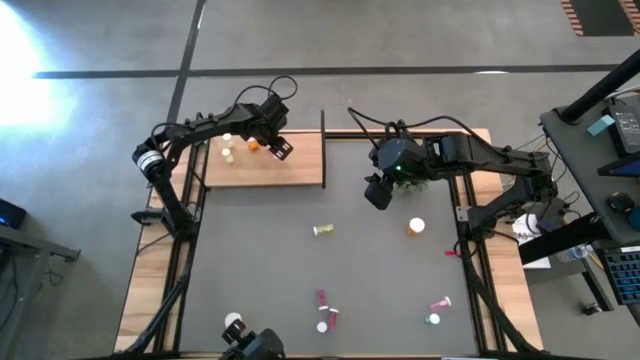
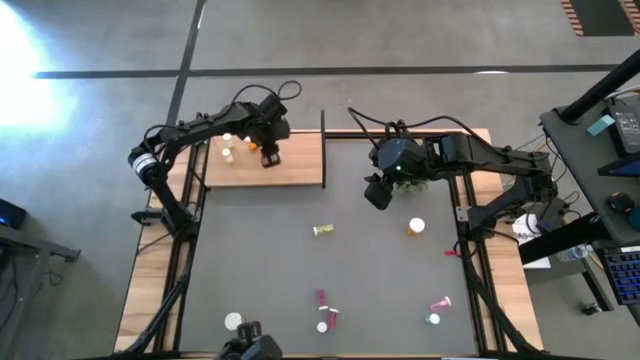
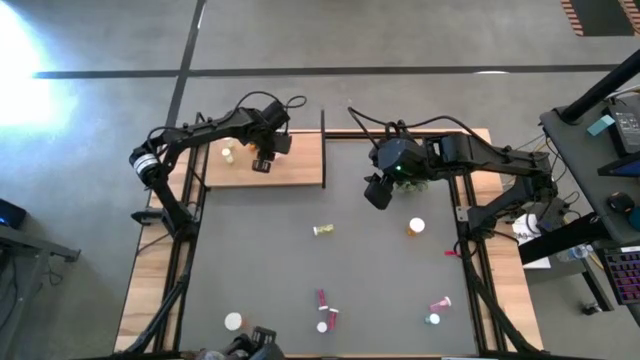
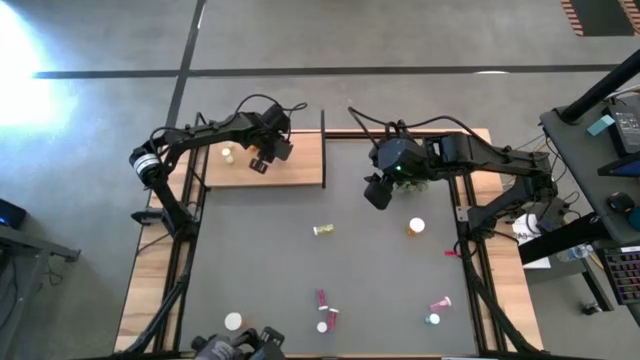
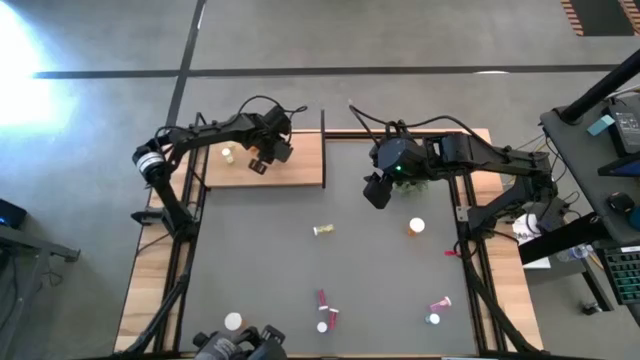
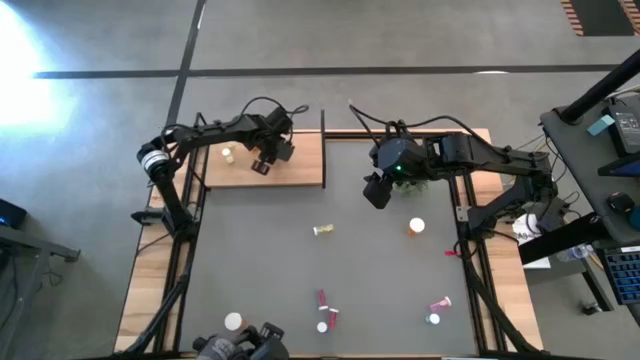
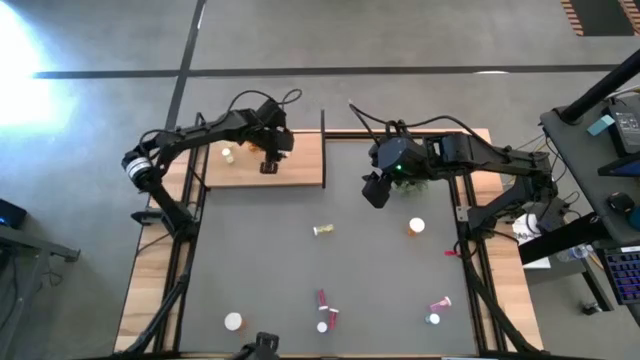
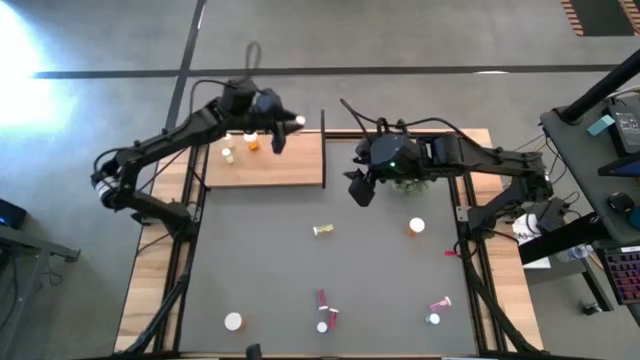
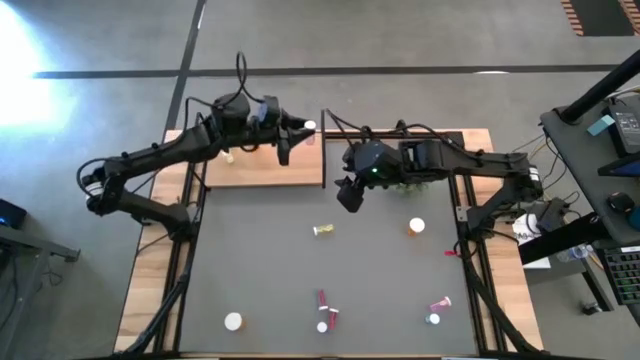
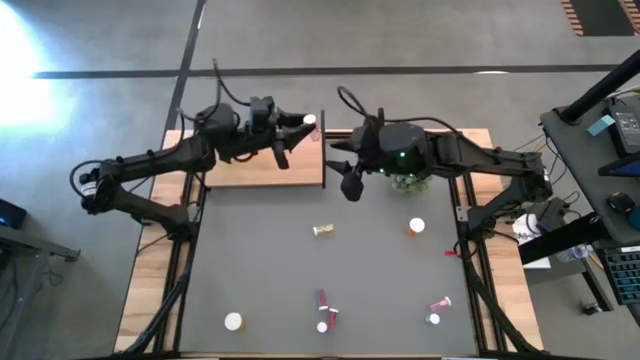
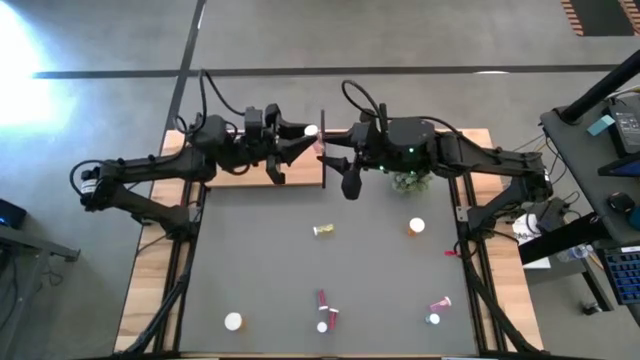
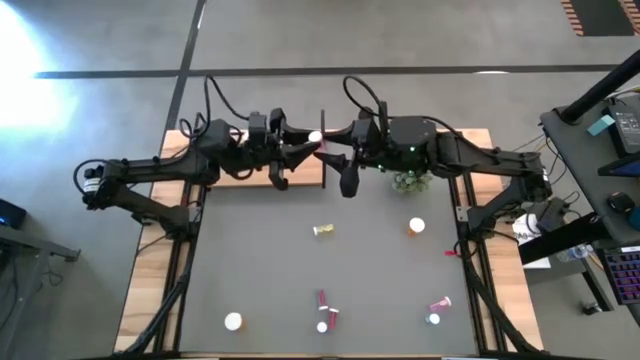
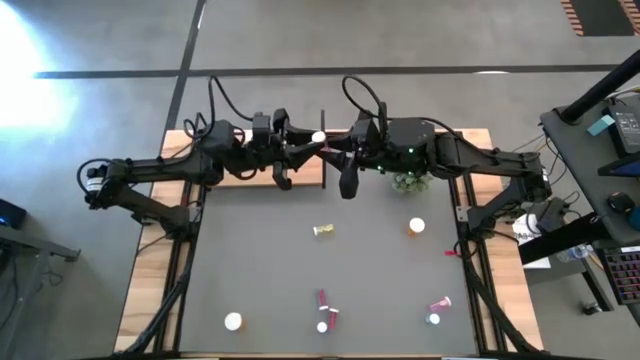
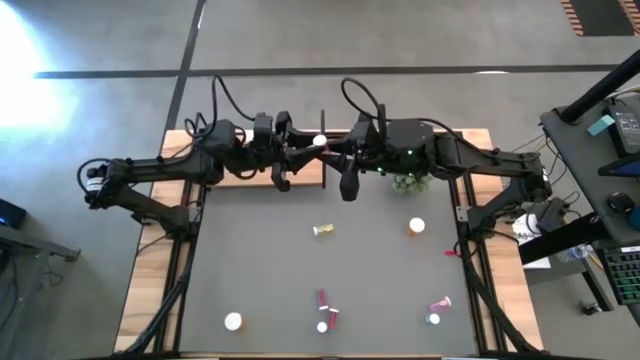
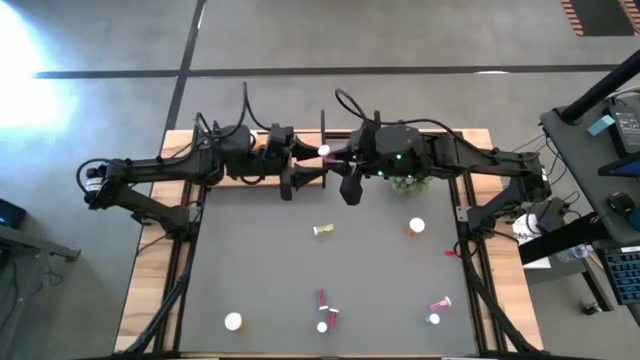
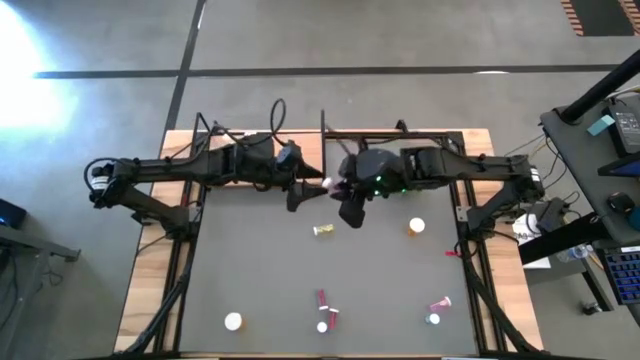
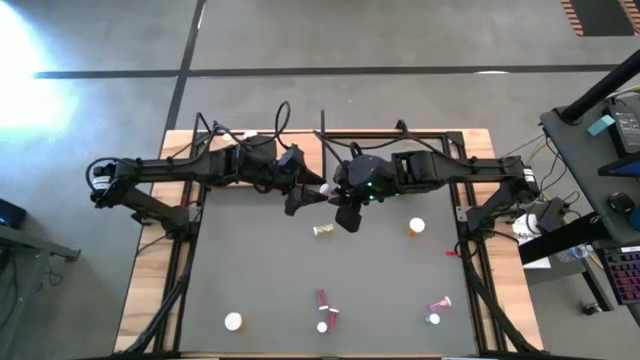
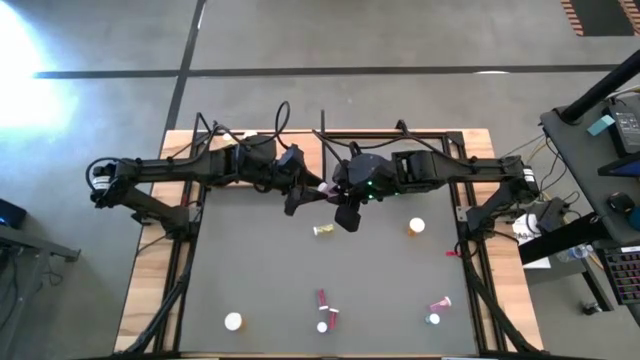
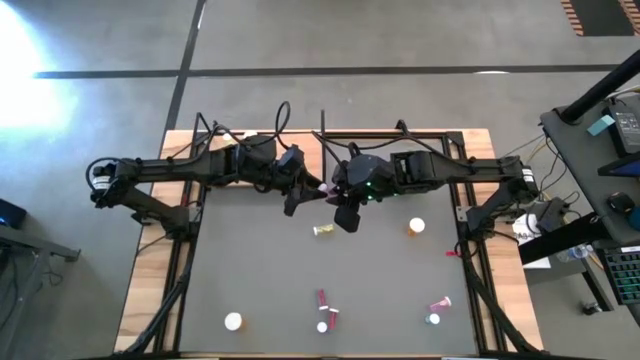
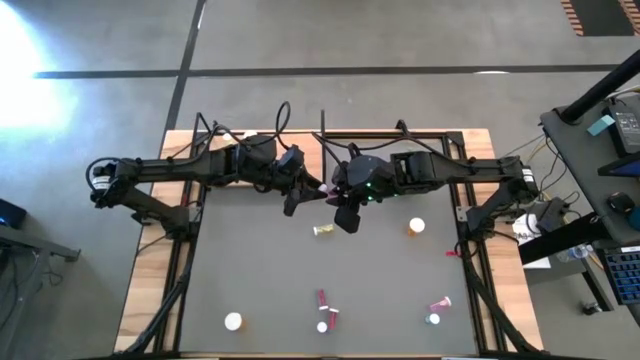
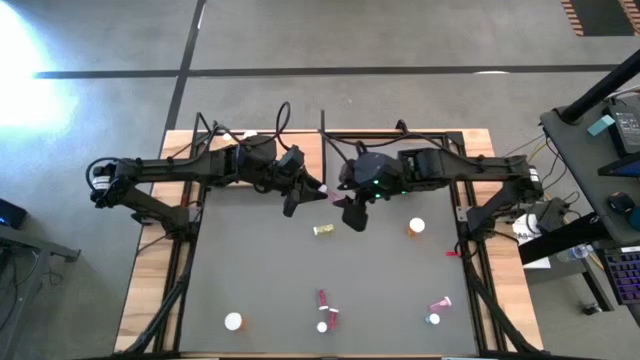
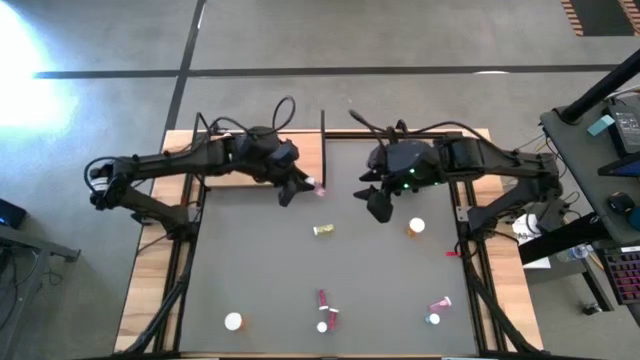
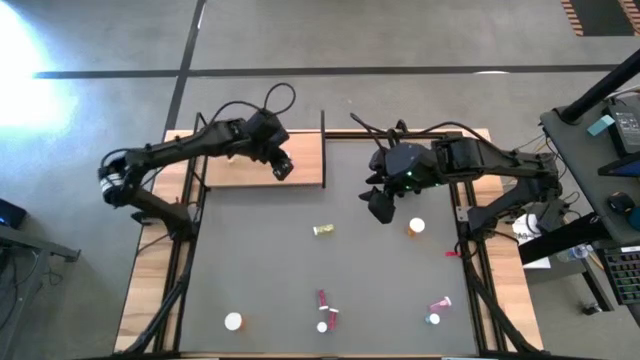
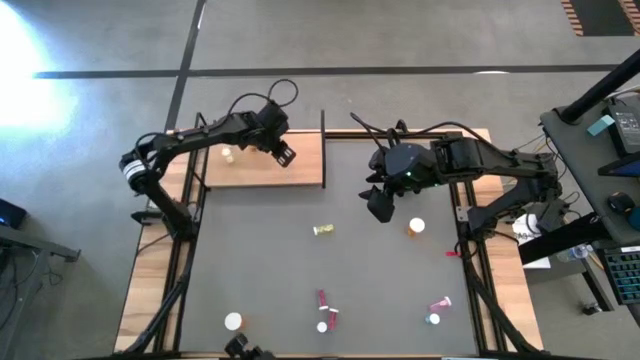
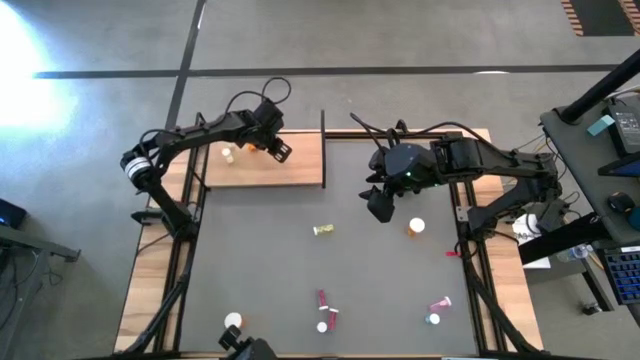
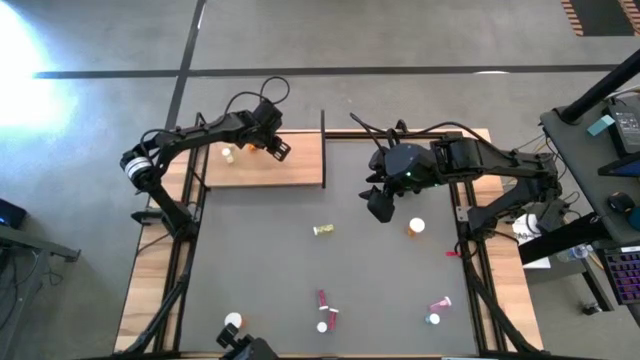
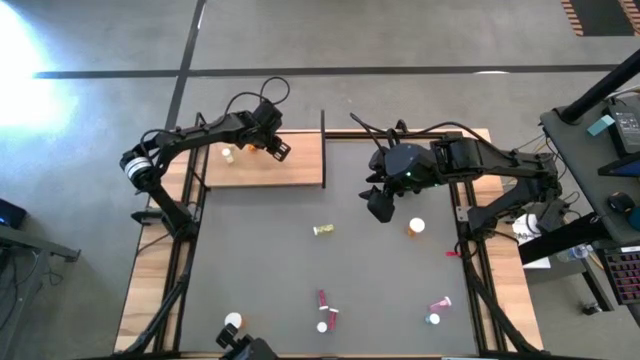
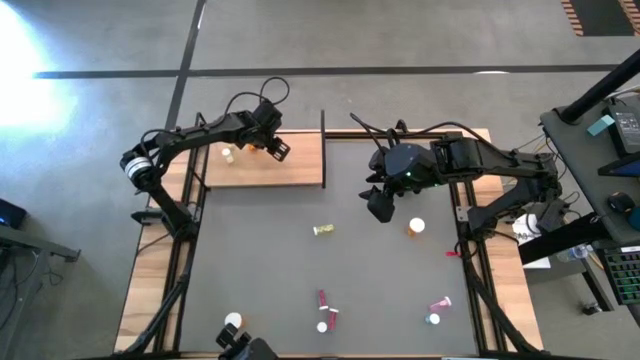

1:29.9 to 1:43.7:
Task: Pick and place medicine bottles onto shelf by color
Put the top left pink pill bottle on the shelf

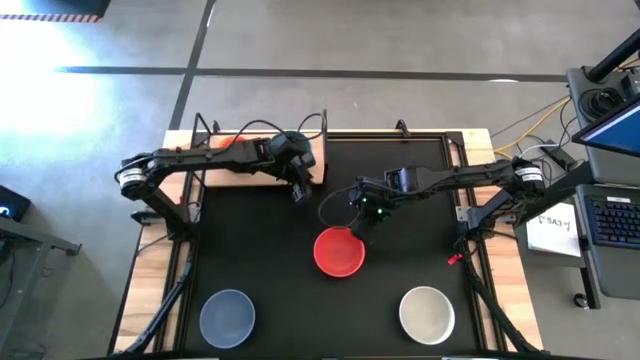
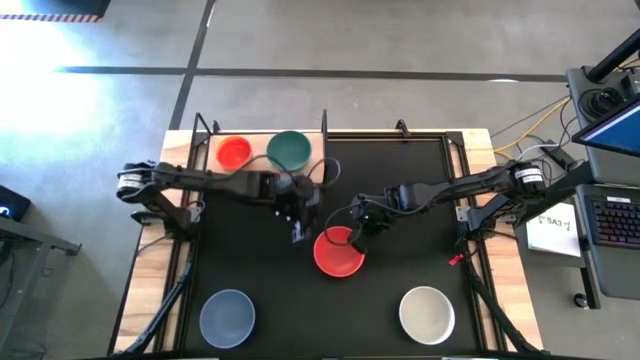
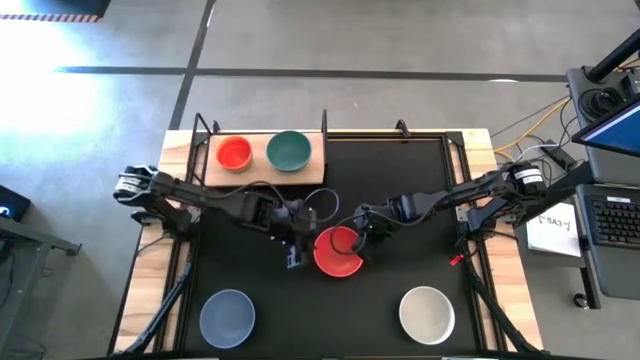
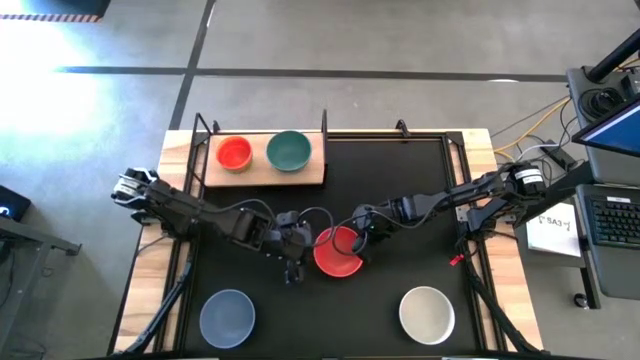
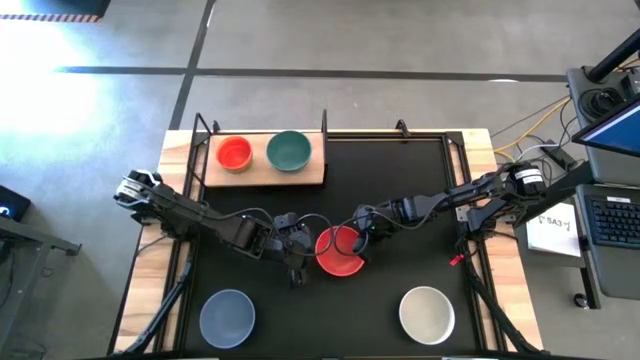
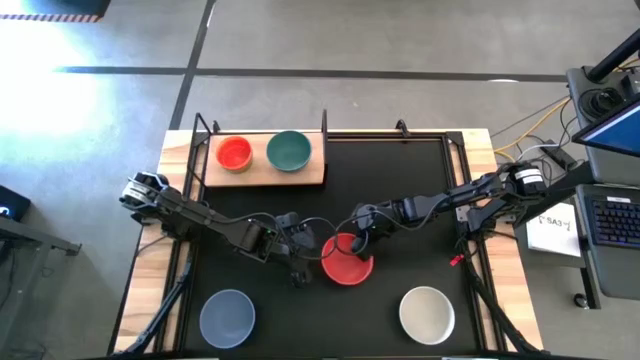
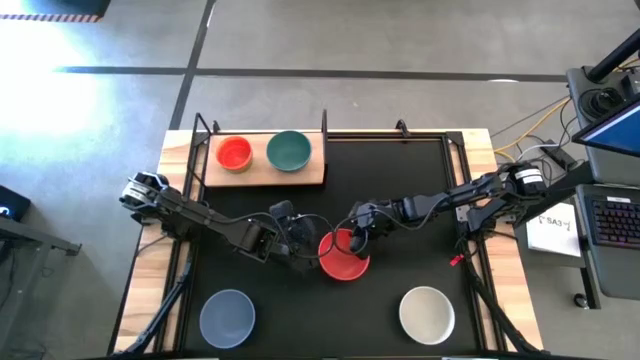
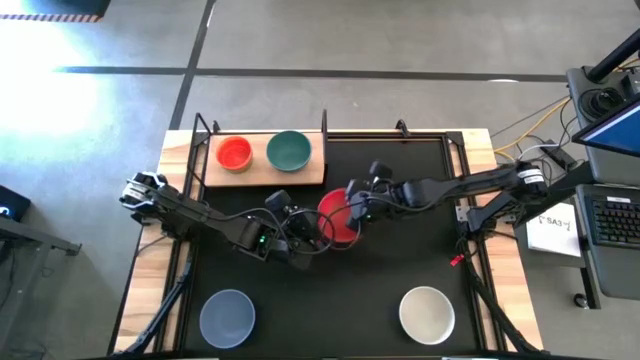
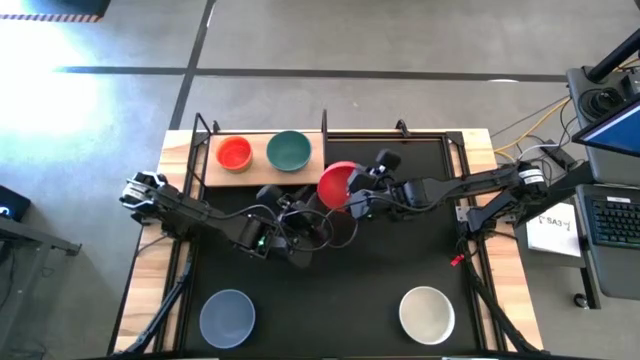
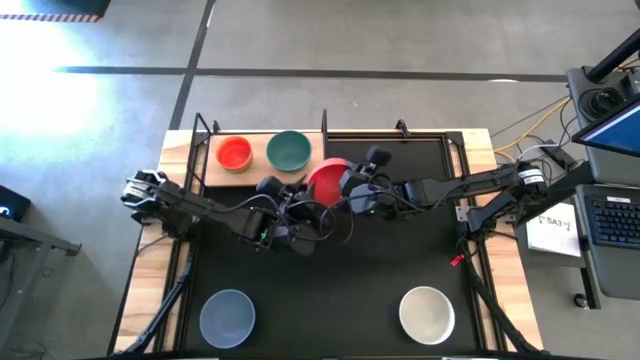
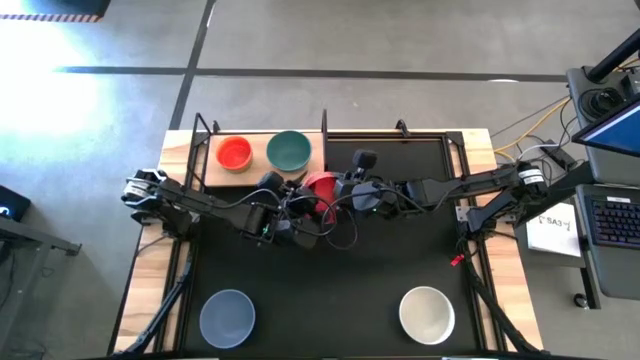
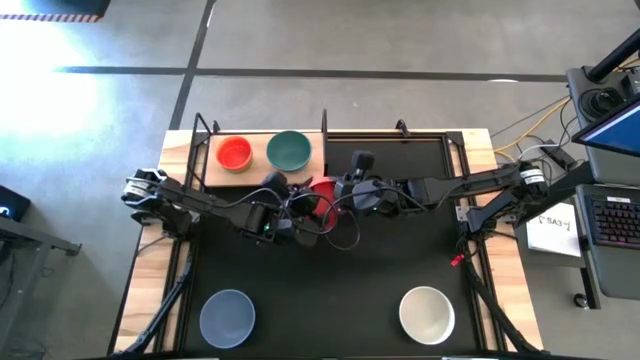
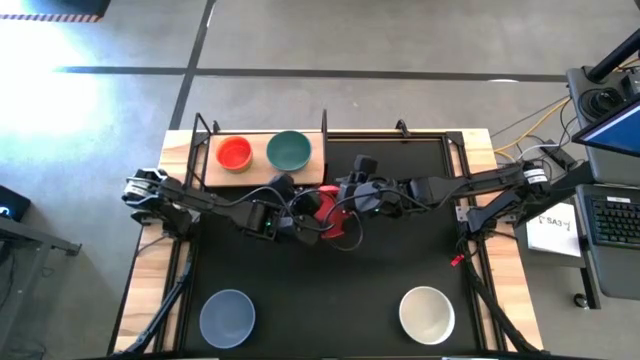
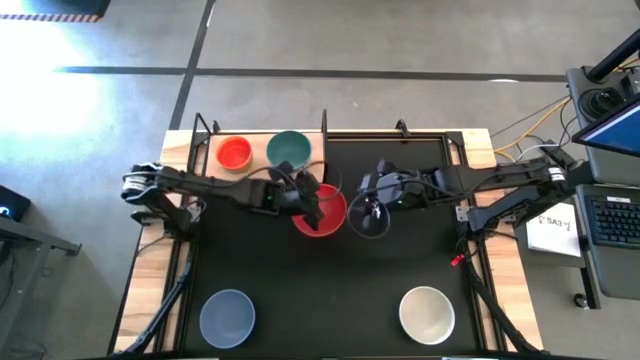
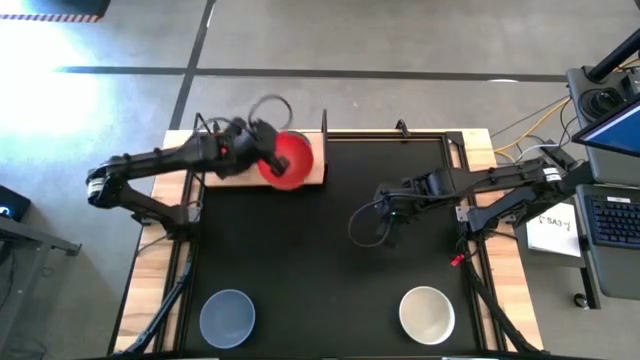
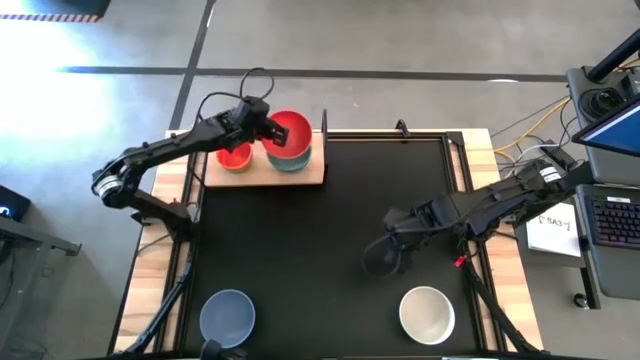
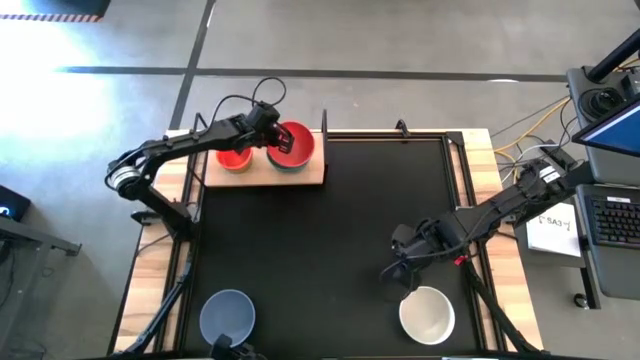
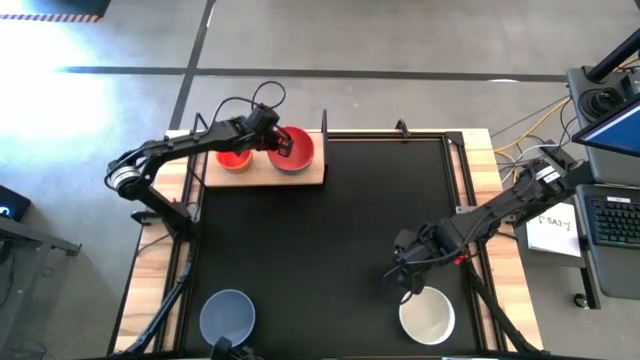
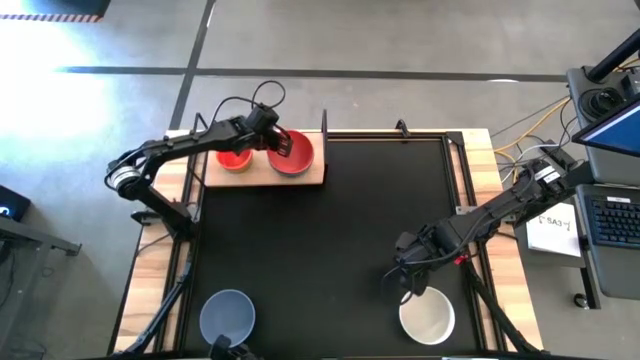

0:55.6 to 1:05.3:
Task: Place and stack bowls onto a shelf
Stack the large orange bowl onto the green bowl on the shelf
